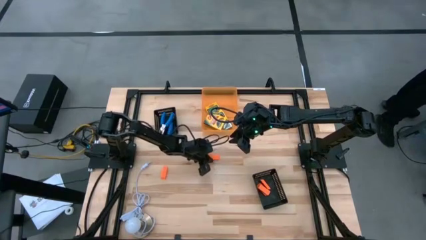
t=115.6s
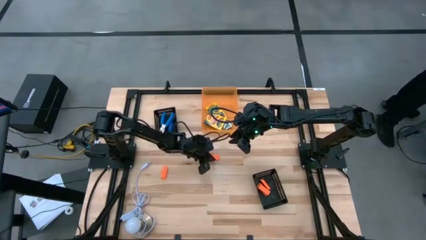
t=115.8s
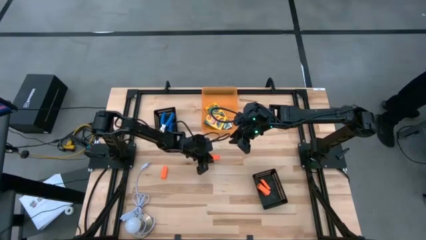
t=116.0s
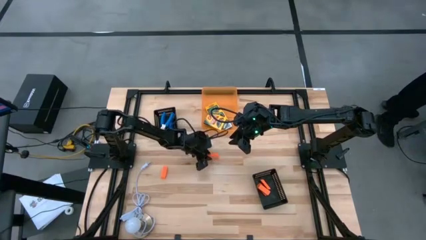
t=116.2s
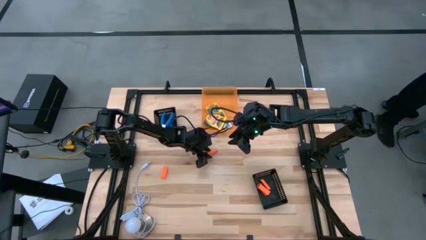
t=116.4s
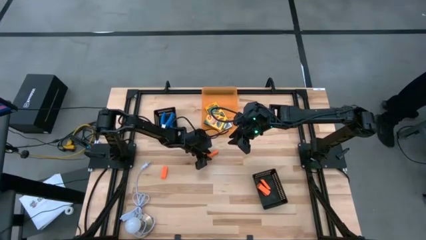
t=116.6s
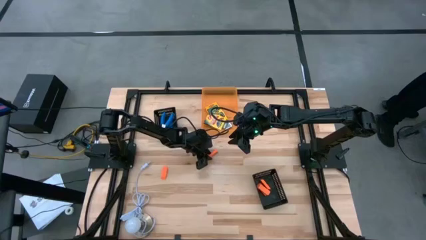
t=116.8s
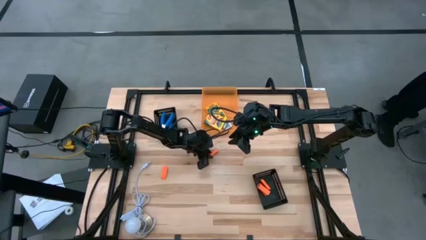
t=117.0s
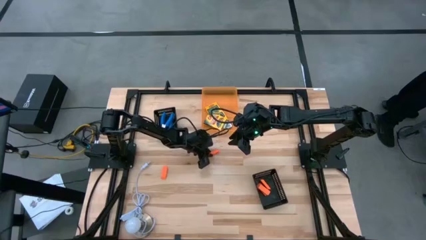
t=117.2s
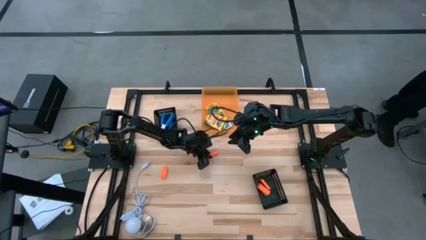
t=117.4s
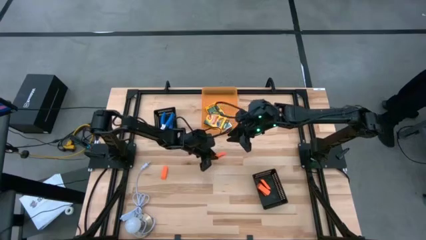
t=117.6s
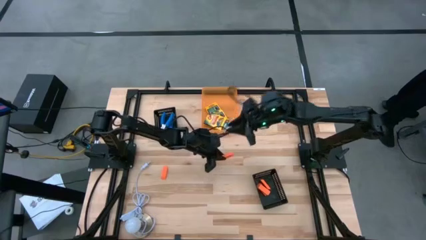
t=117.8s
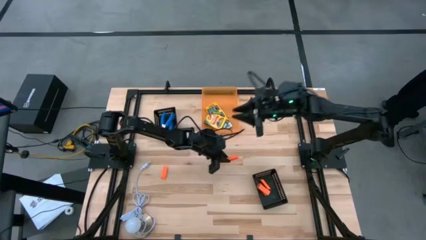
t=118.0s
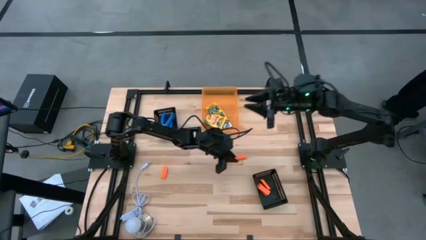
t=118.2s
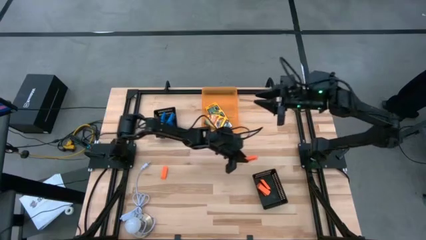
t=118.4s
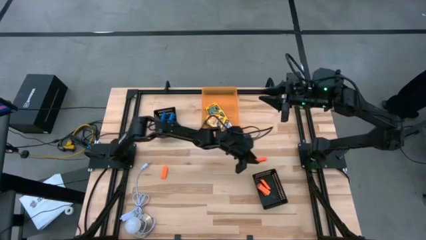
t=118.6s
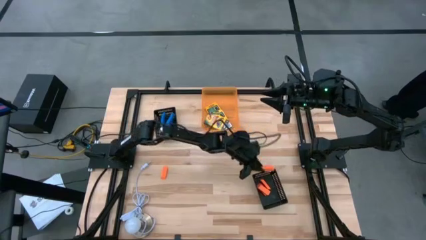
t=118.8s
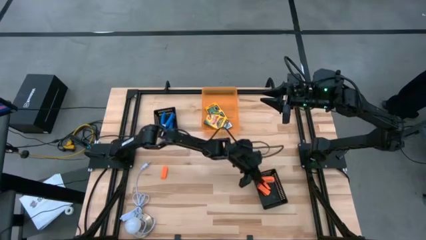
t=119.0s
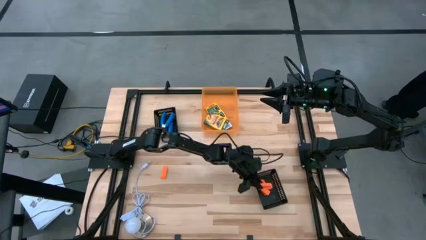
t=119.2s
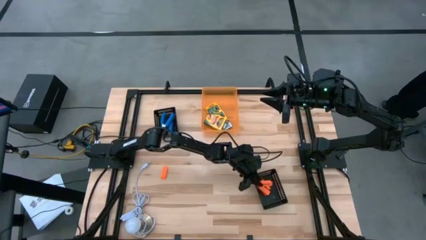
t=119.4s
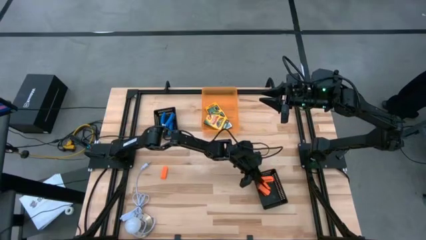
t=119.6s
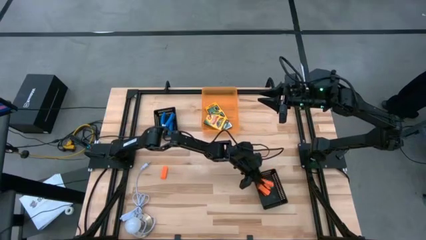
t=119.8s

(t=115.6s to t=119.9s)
Task: Pick & Place School Supplies
Put the orange eraser into the bottom black bin

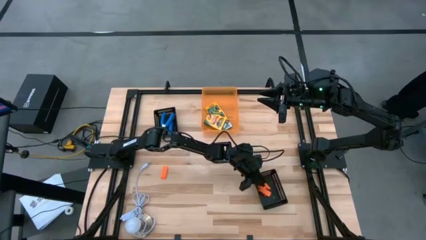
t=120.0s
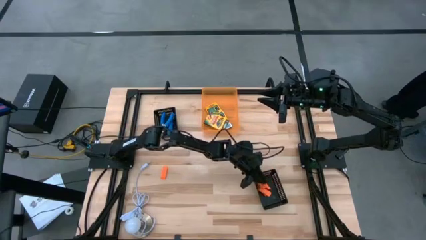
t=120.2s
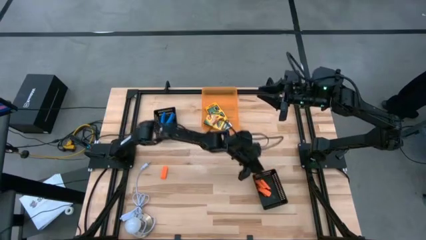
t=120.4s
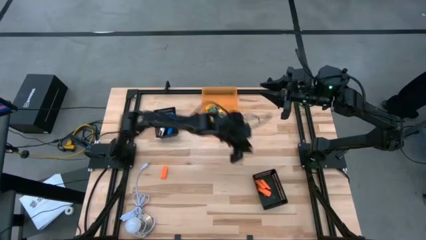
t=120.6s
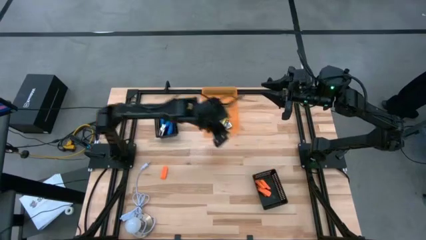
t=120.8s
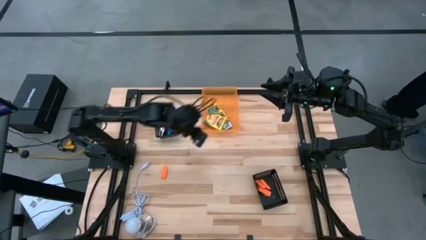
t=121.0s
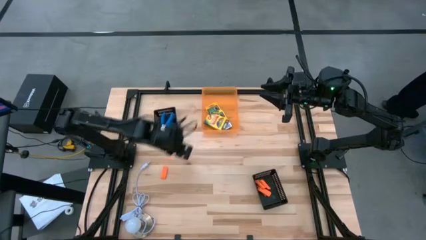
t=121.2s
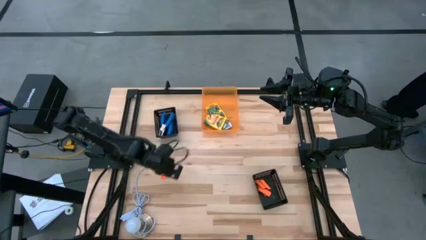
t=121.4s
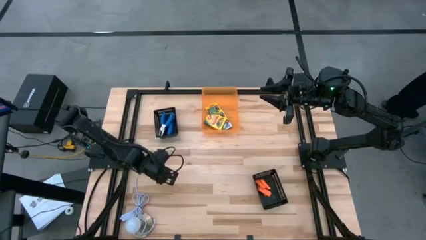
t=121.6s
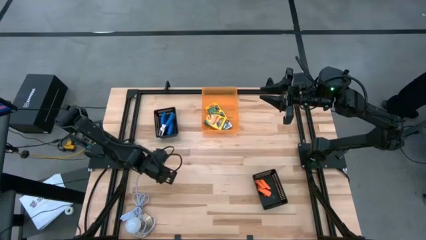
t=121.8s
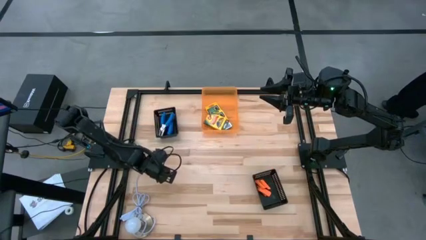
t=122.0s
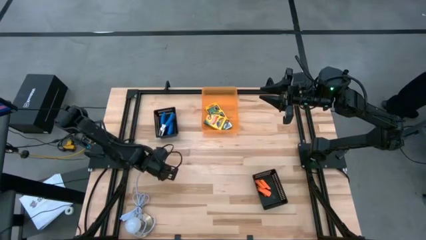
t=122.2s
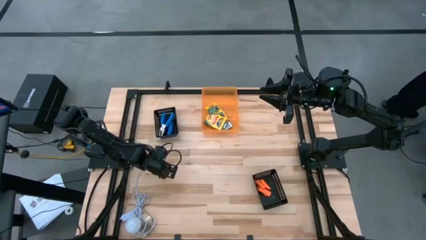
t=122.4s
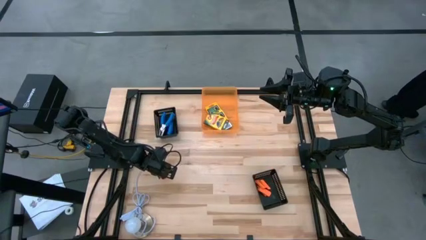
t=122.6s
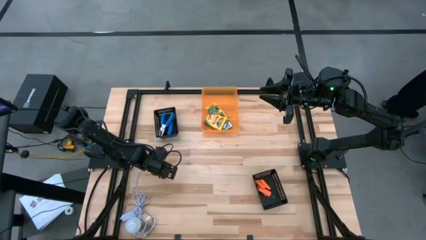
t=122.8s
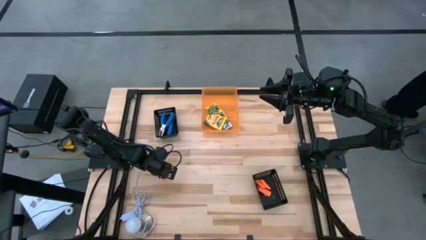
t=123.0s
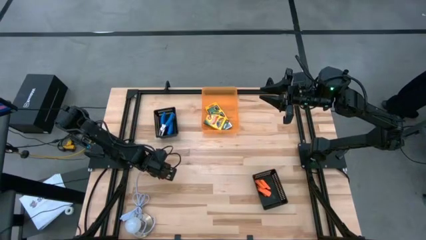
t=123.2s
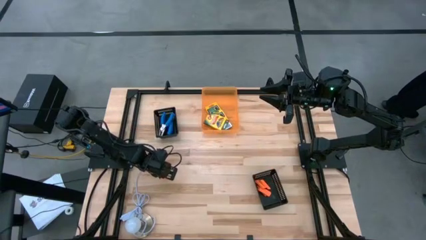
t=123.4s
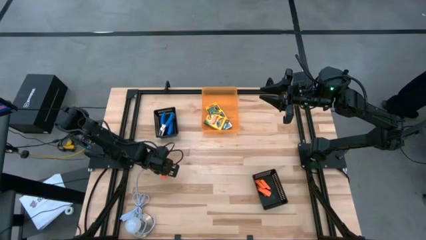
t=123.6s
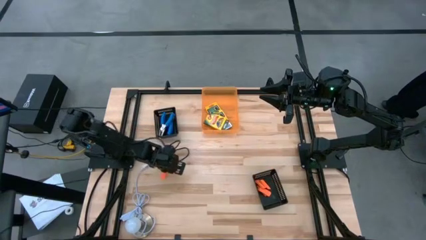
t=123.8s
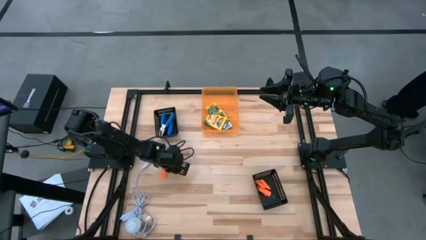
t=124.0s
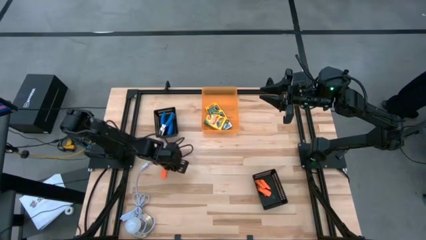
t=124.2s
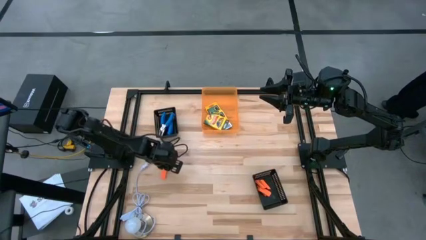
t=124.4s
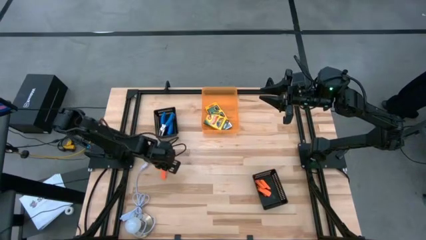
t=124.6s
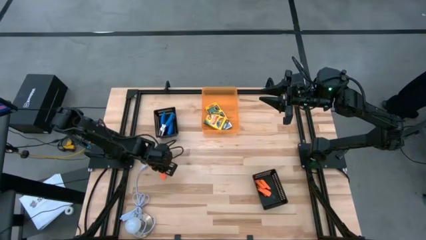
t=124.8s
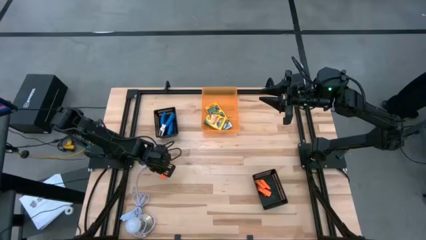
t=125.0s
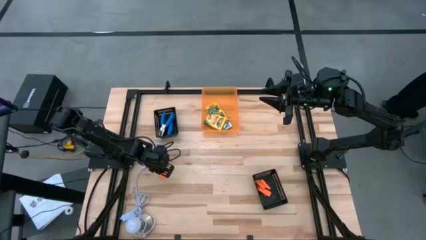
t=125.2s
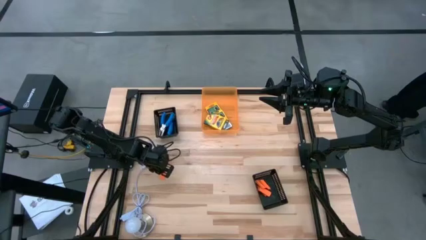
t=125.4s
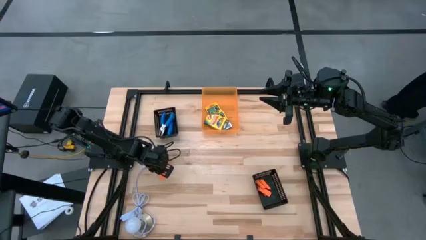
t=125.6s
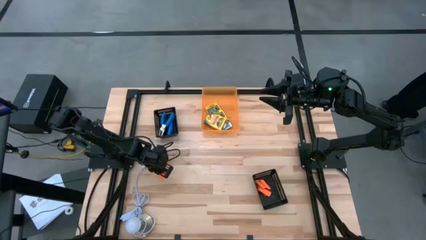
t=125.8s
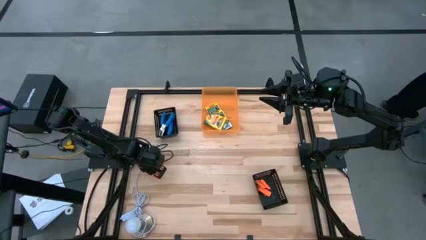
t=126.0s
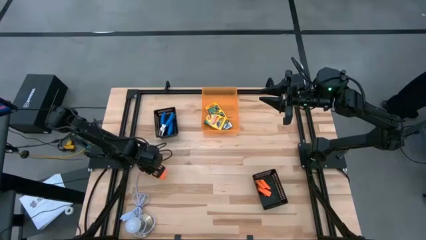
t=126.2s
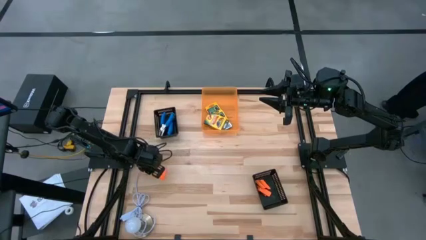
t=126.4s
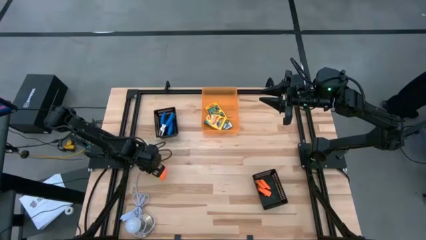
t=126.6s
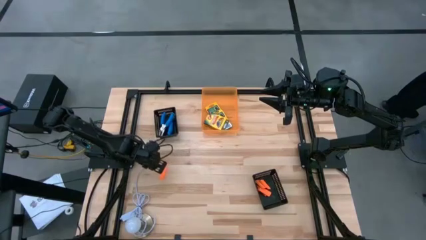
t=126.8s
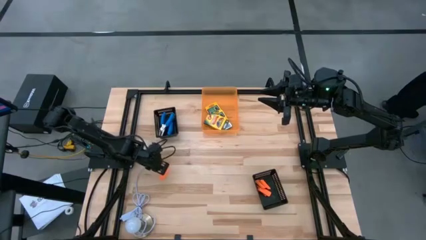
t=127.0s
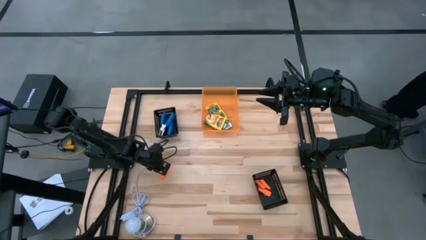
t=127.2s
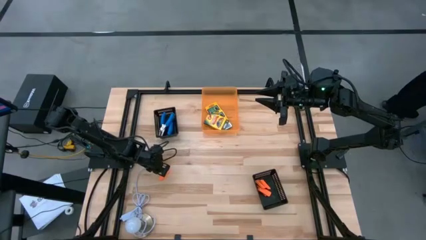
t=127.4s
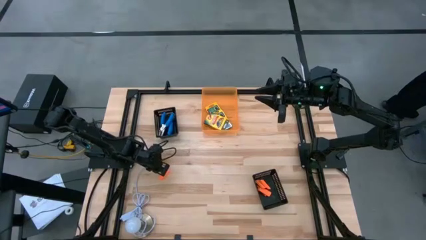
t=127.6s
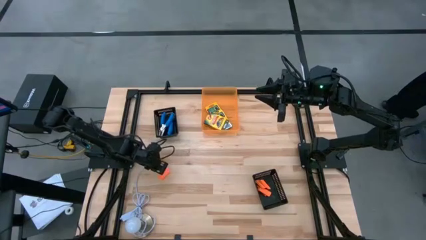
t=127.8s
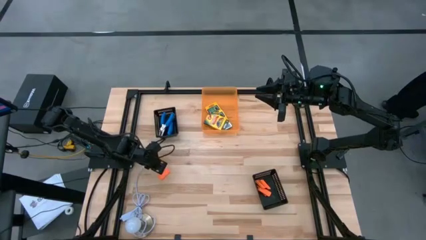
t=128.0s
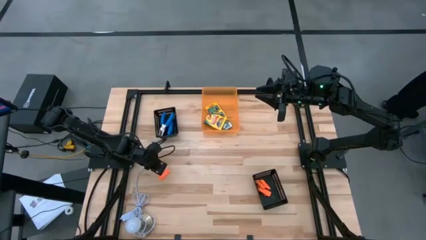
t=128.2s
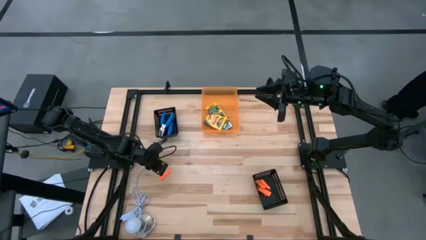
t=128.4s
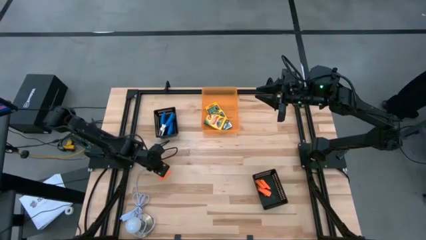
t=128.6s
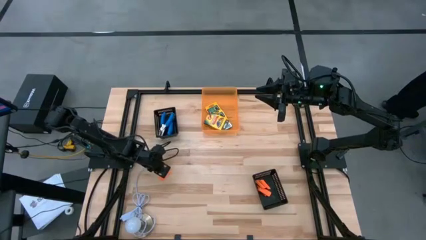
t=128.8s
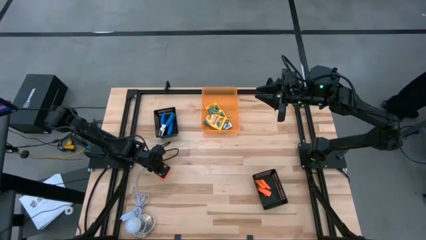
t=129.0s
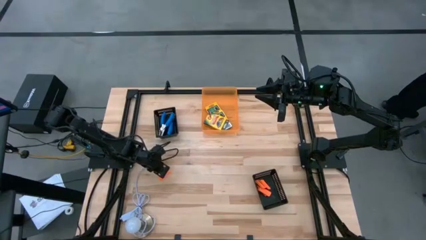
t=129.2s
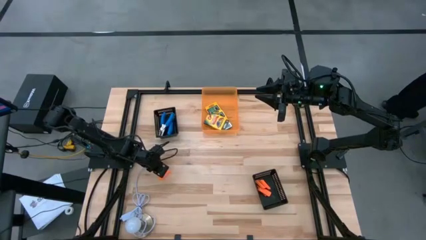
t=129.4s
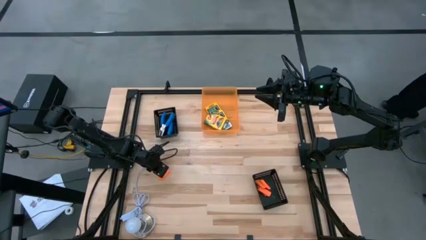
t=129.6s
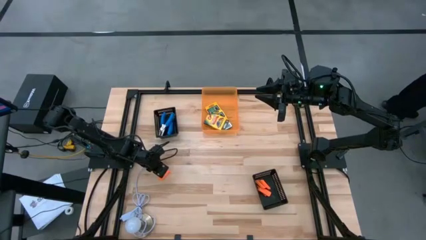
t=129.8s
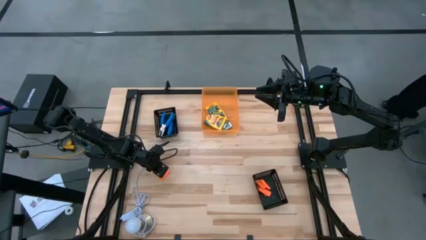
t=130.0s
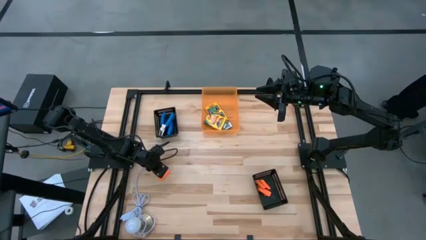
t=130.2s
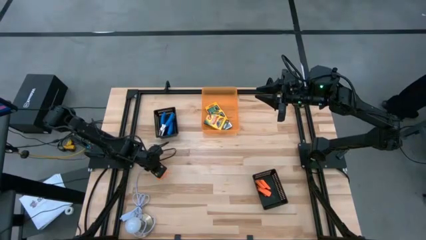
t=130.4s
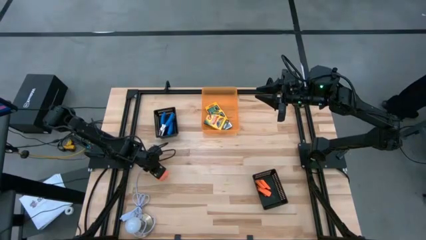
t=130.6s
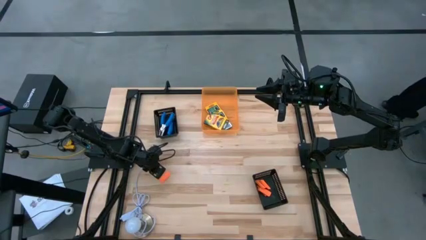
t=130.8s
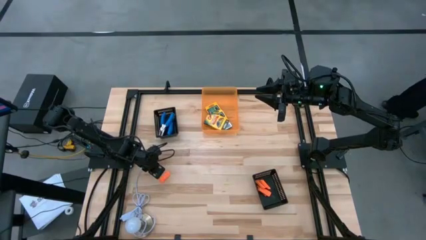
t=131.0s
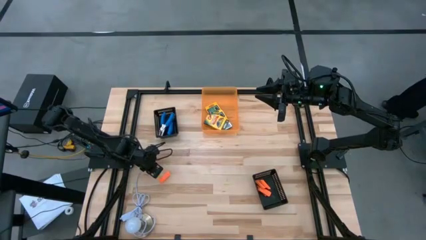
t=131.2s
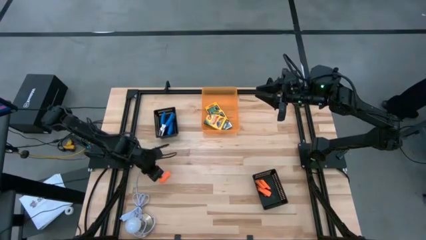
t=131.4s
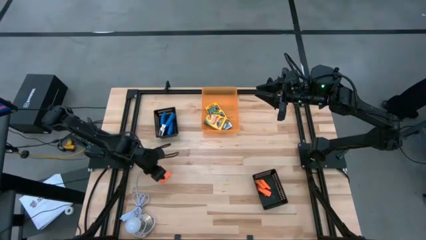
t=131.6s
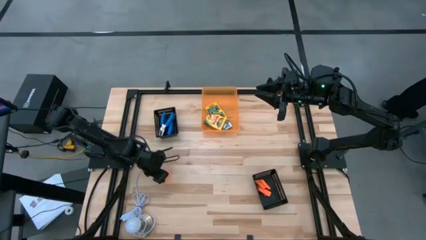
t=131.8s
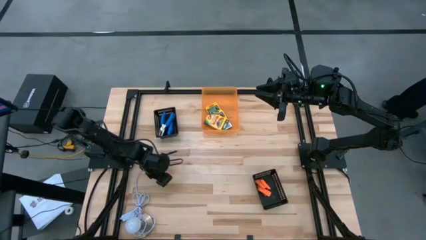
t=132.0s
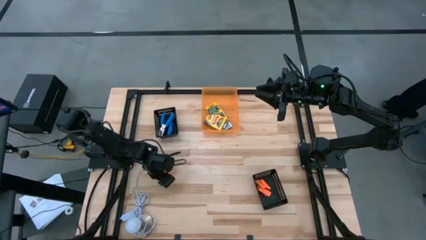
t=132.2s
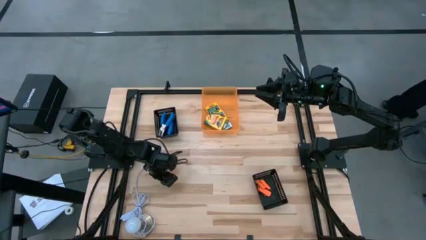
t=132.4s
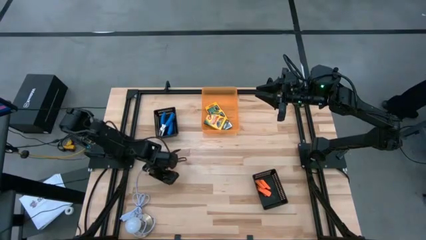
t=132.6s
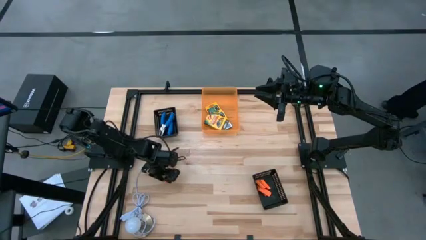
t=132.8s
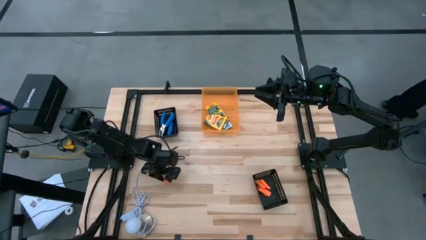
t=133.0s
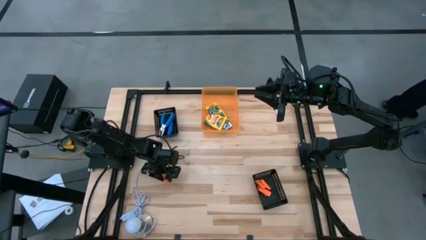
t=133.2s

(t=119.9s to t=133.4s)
Put the orange eraser into the bottom black bin
